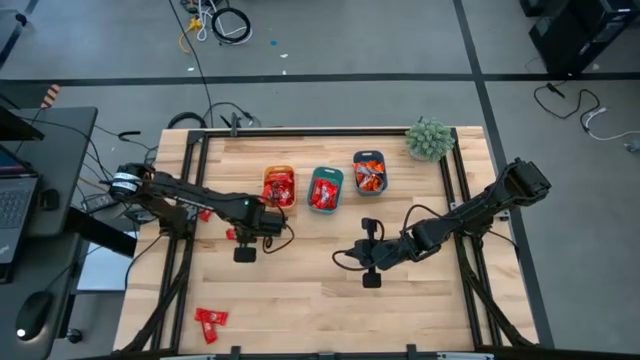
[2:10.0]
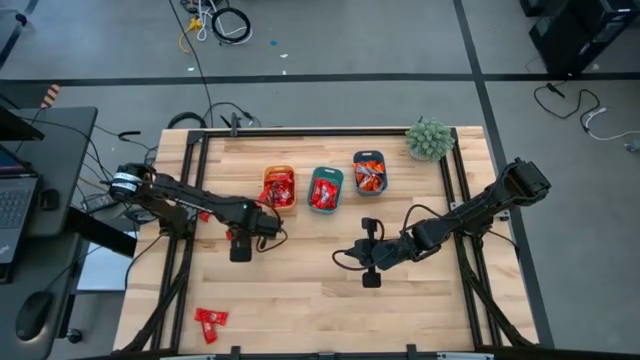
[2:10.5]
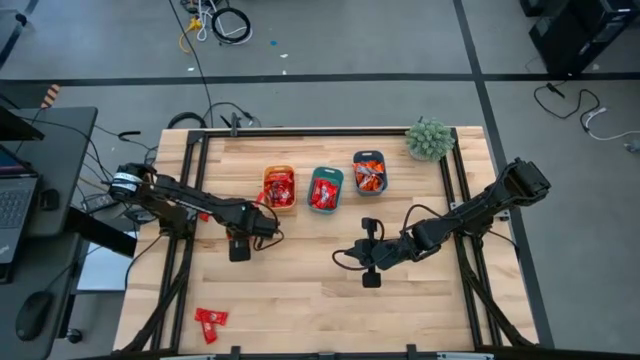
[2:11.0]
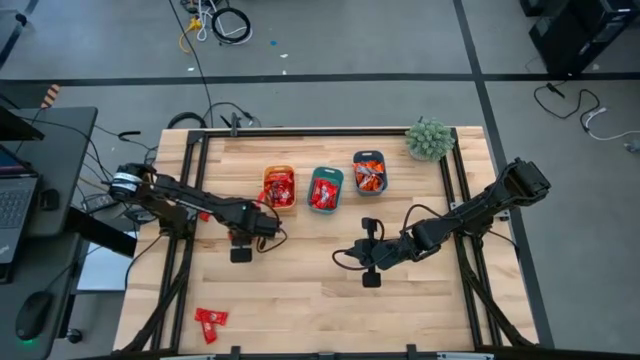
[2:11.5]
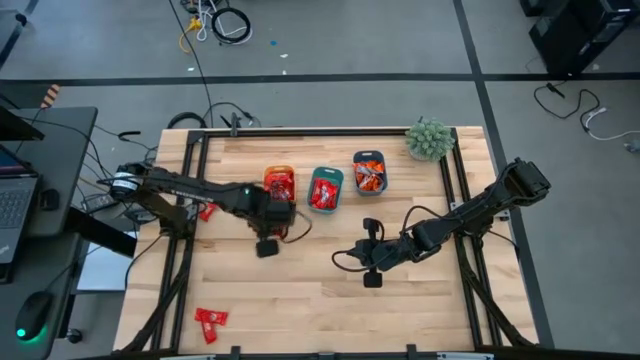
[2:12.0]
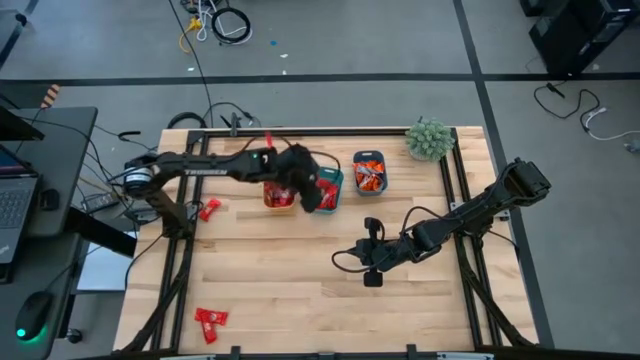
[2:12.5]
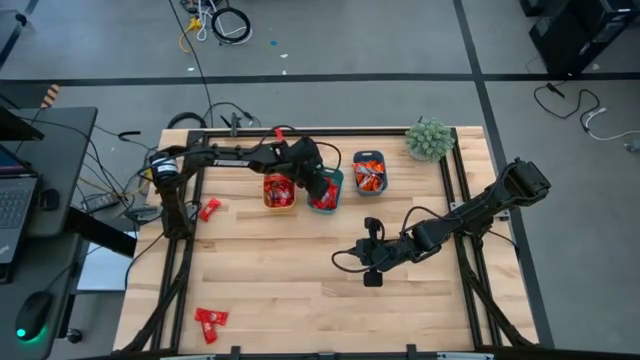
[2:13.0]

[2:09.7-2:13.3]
Task: Sort candy
Put the red chocolate into the green bin

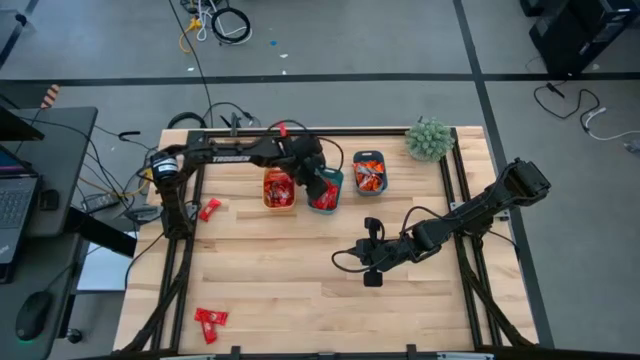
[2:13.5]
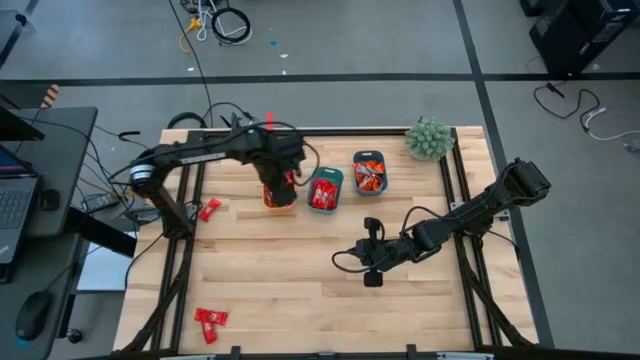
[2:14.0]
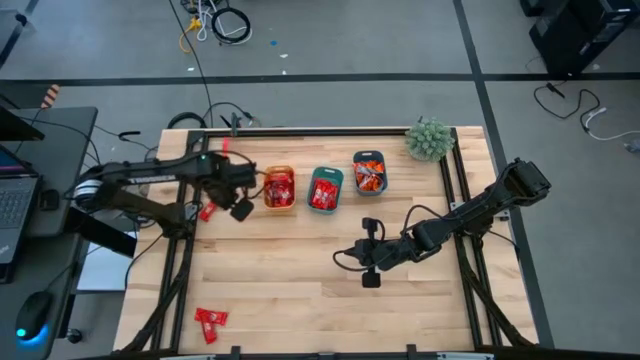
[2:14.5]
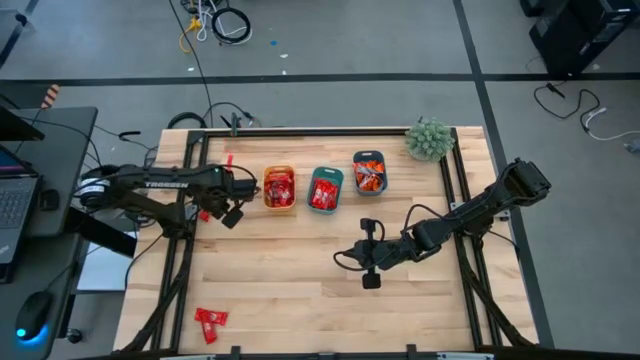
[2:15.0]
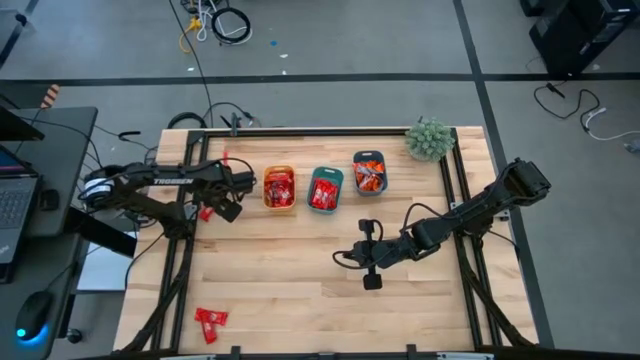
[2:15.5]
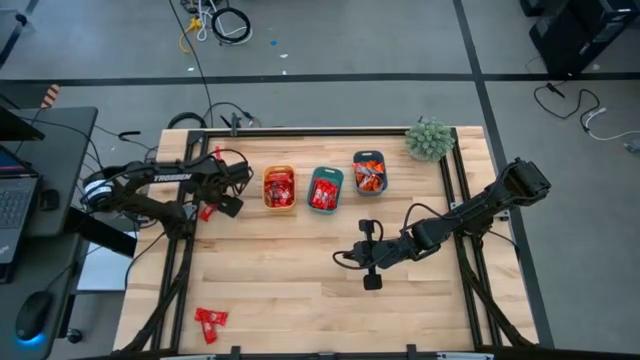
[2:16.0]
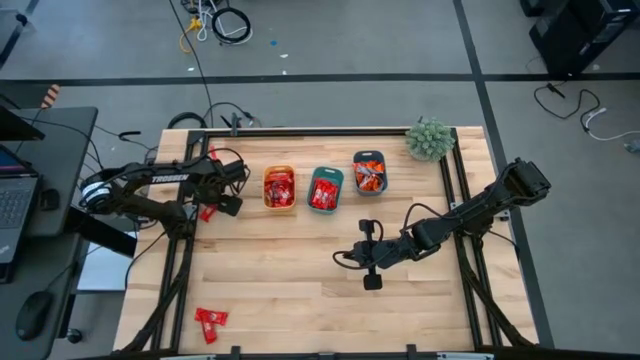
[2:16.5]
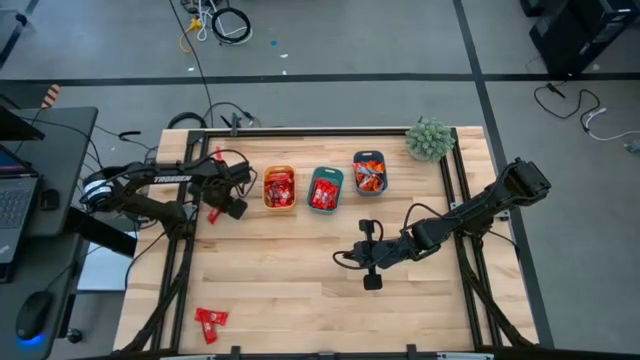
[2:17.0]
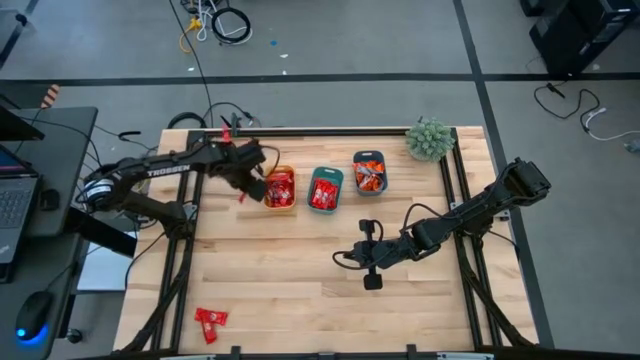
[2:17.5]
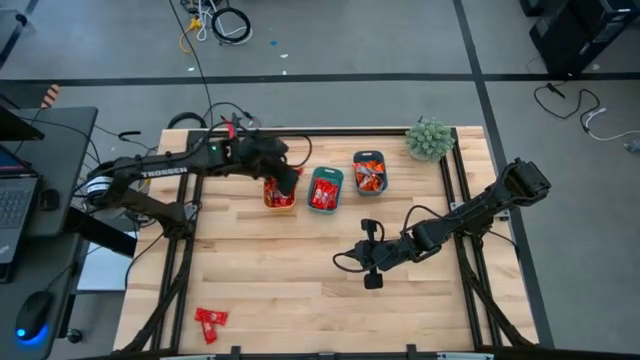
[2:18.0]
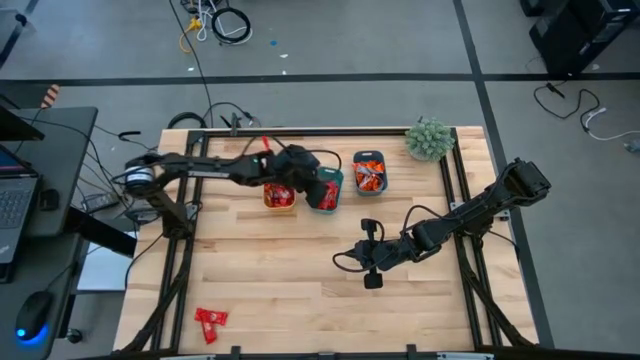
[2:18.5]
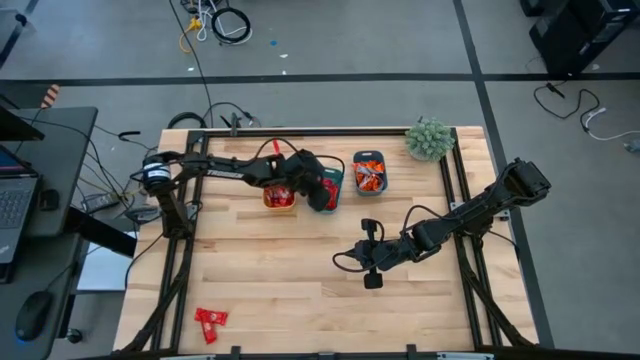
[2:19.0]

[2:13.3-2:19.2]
Put the red chocolate into the green bin

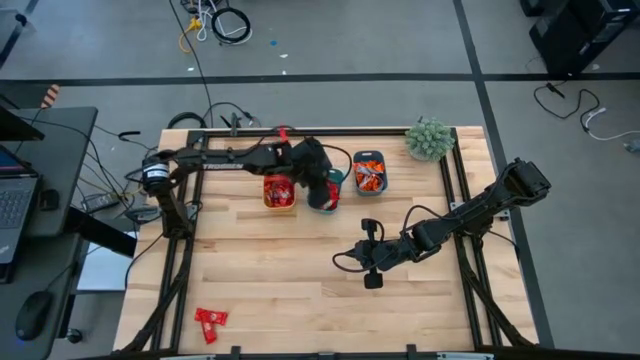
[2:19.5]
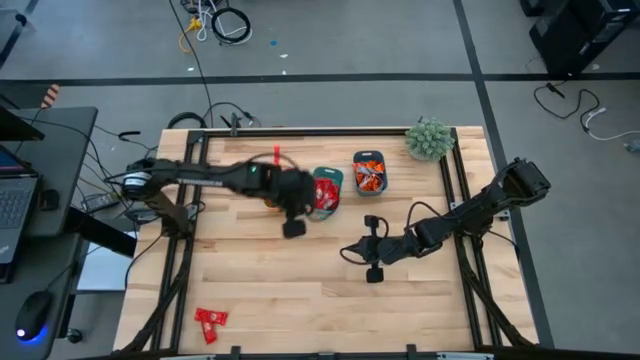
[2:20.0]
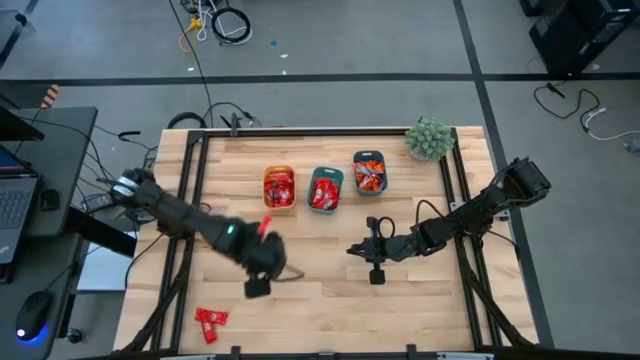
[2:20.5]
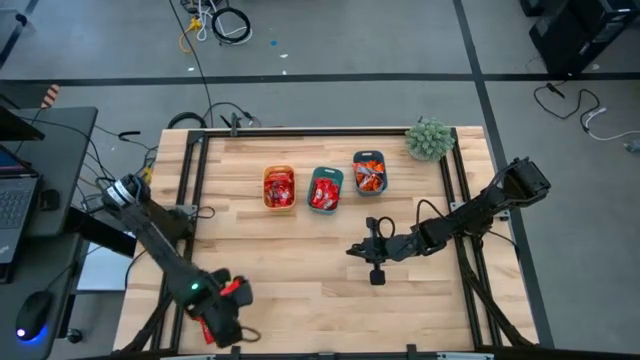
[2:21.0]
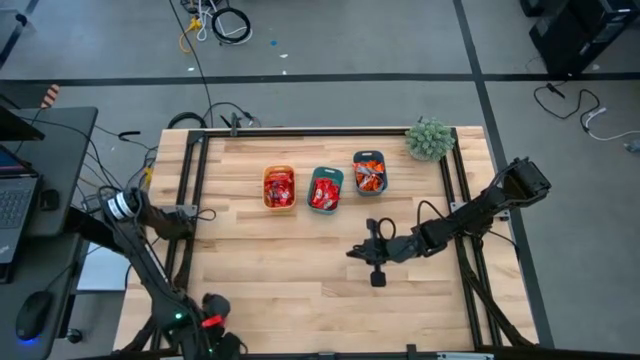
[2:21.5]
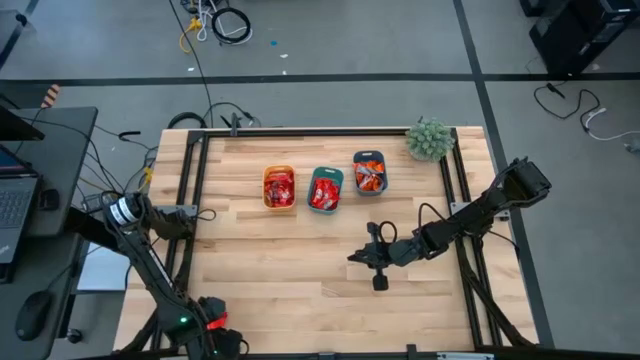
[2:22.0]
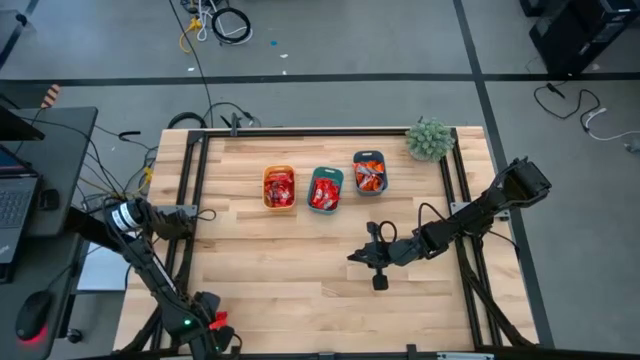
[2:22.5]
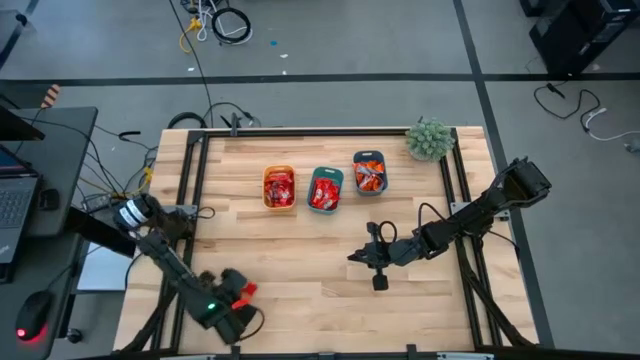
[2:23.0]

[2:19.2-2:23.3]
Move the red chocolate to the center

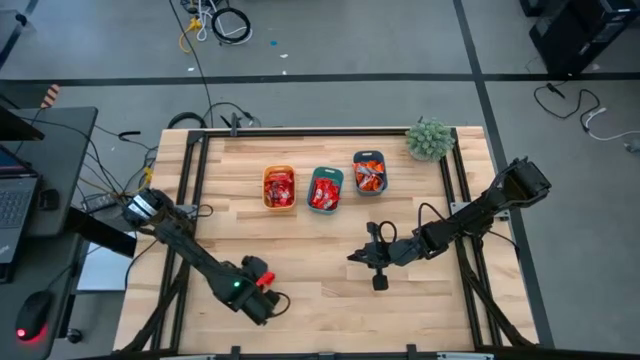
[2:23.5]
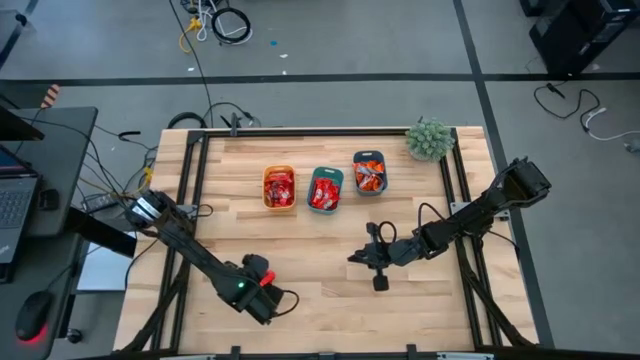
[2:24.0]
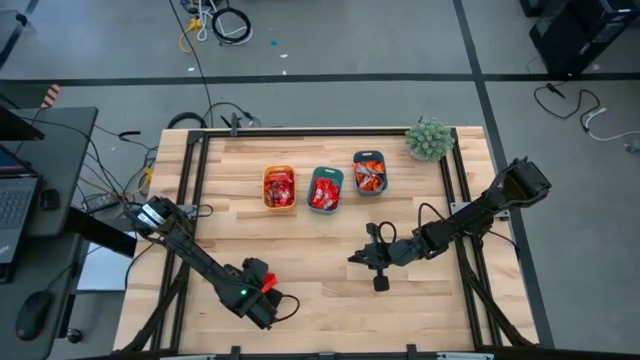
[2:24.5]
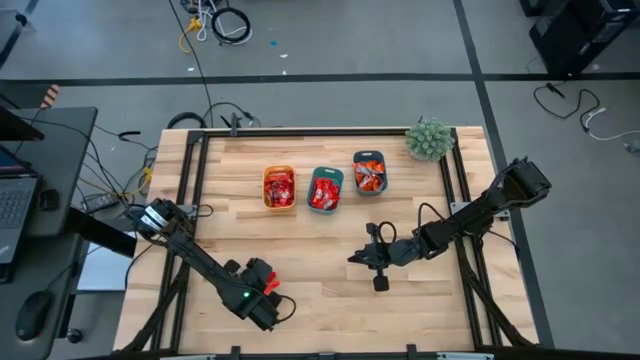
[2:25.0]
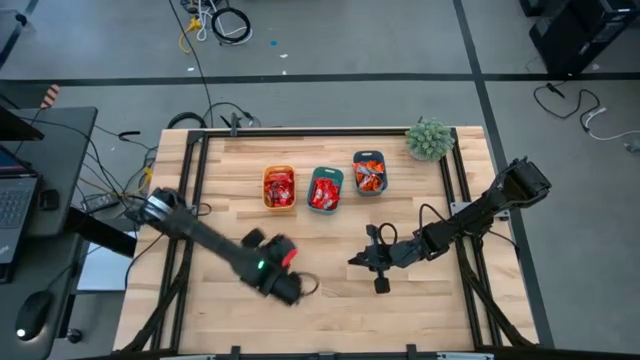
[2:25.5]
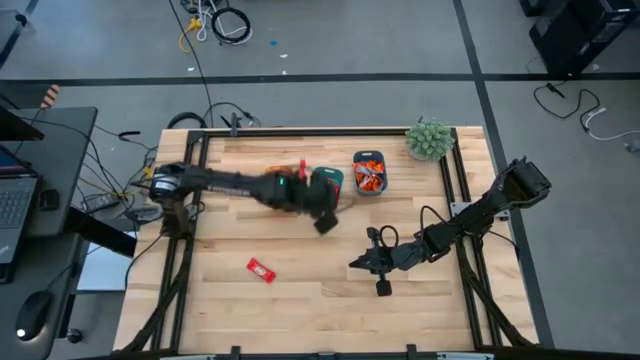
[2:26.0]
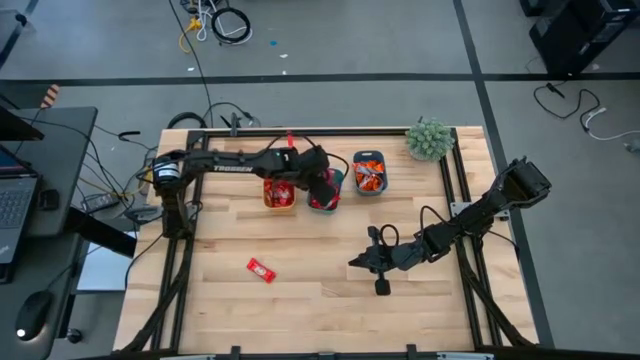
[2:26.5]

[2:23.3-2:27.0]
Put the red chocolate into the green bin

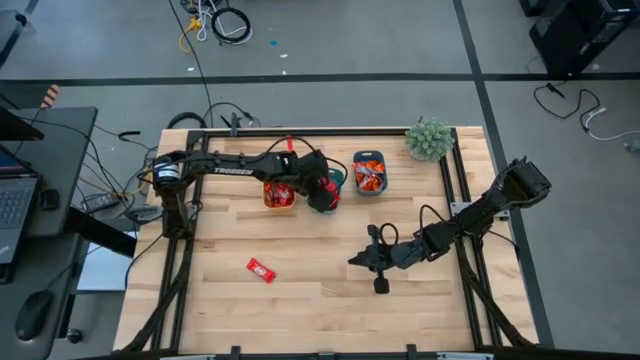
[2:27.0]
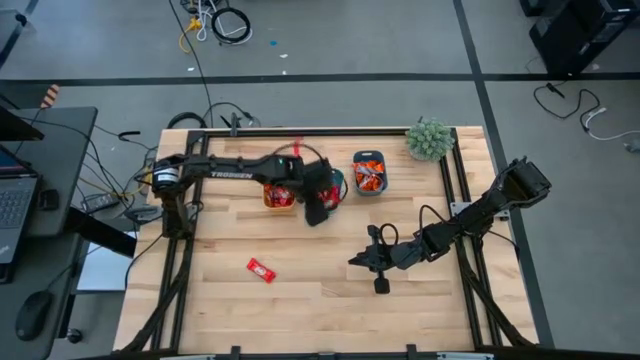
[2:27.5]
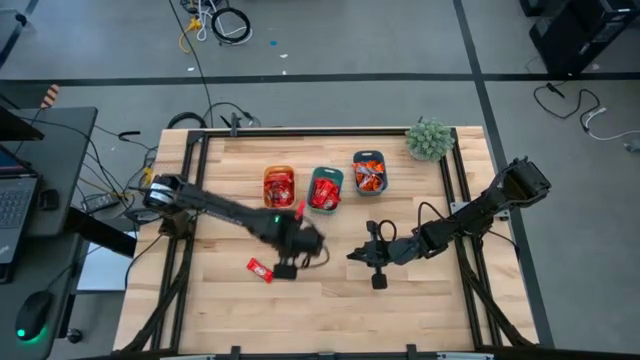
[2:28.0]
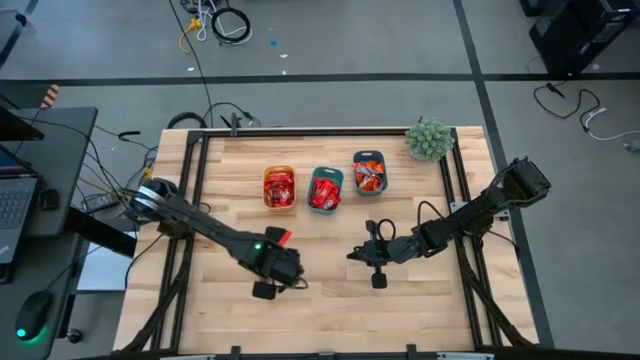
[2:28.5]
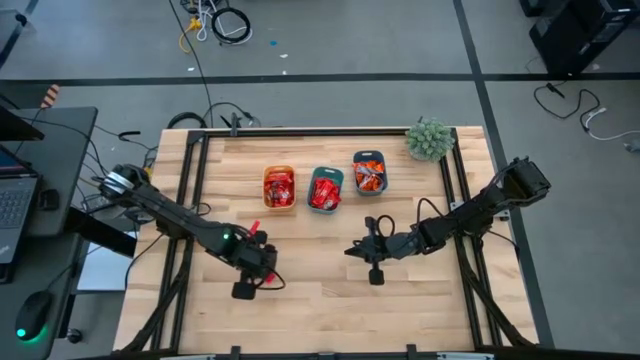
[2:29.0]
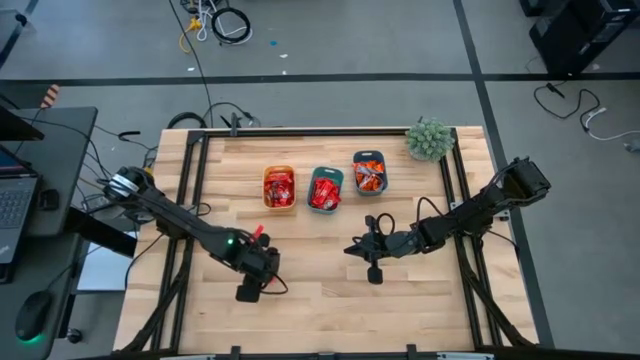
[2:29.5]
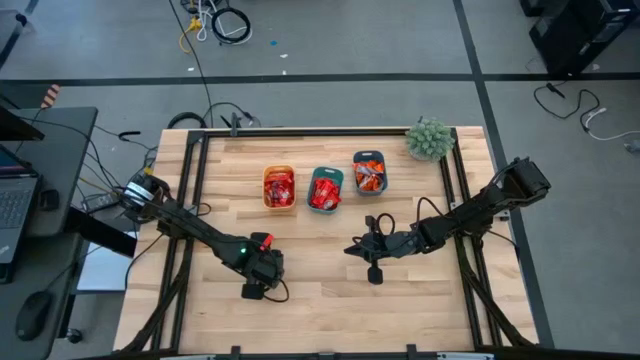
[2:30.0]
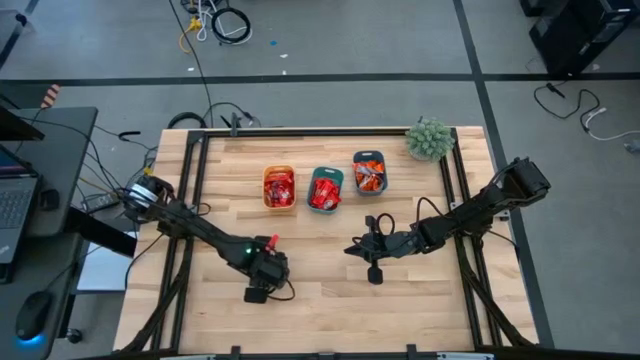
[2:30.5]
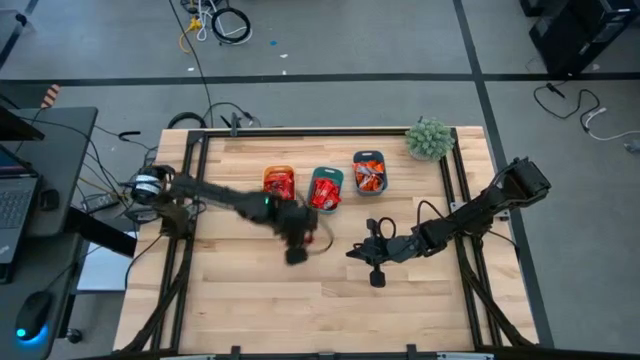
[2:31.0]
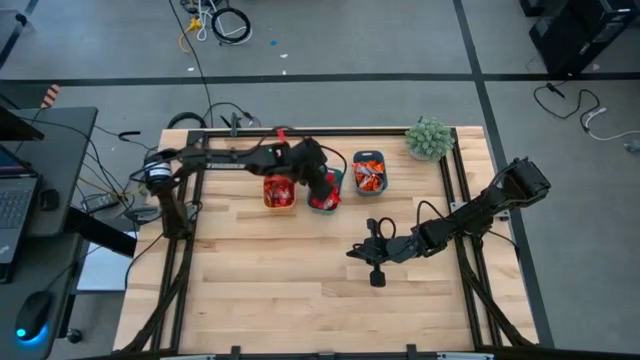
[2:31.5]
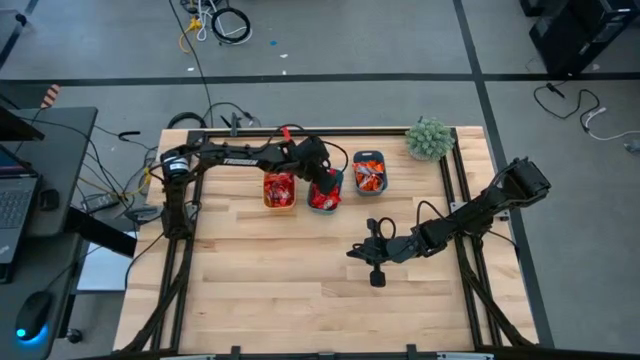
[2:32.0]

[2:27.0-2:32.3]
Put the red chocolate into the green bin

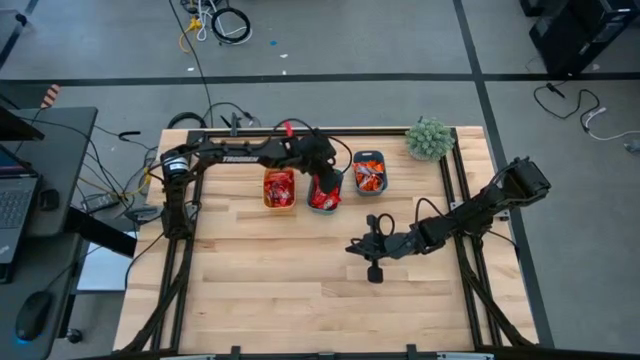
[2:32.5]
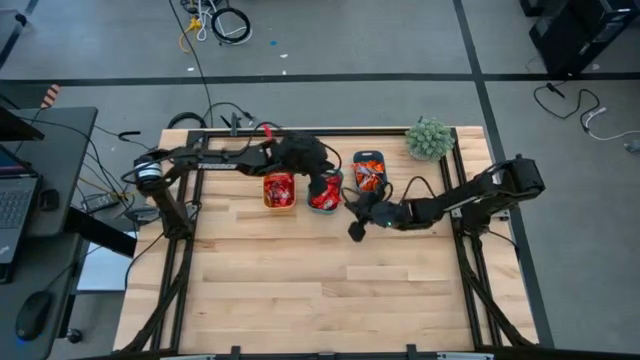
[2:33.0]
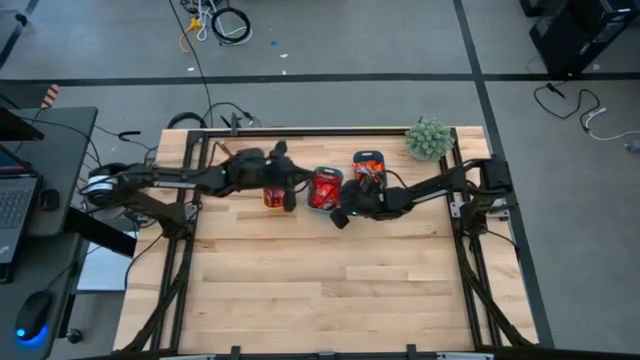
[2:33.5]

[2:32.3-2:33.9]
Adjust the green bin
